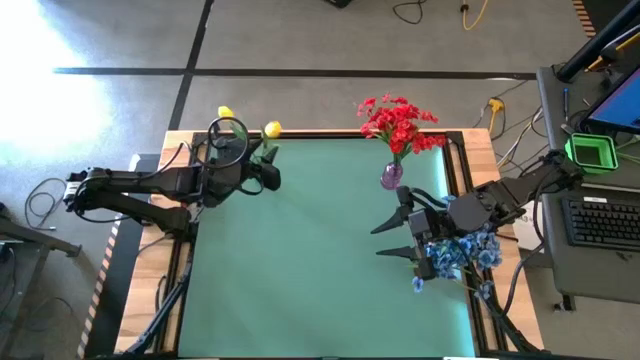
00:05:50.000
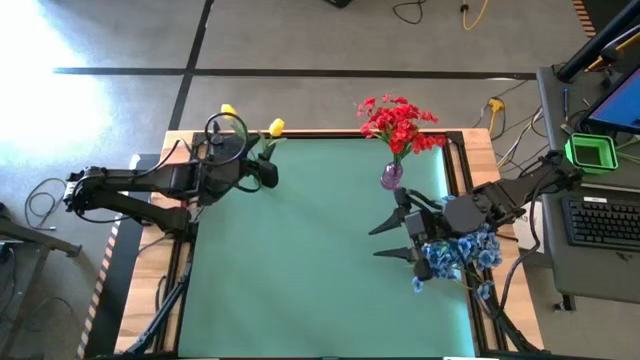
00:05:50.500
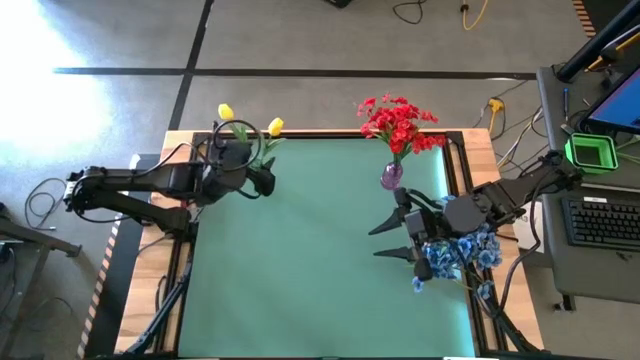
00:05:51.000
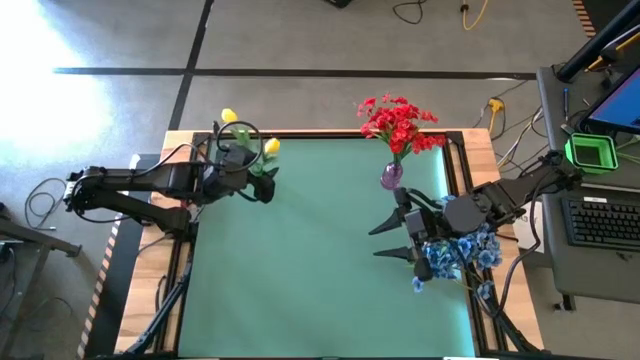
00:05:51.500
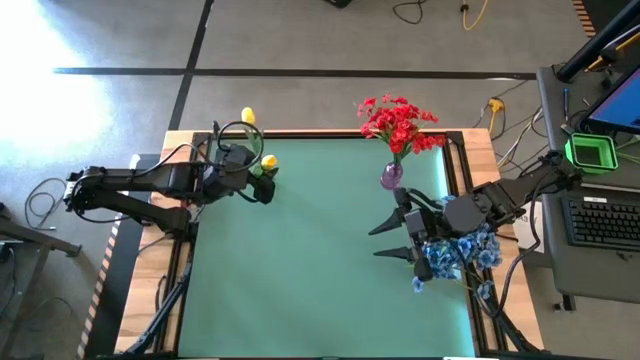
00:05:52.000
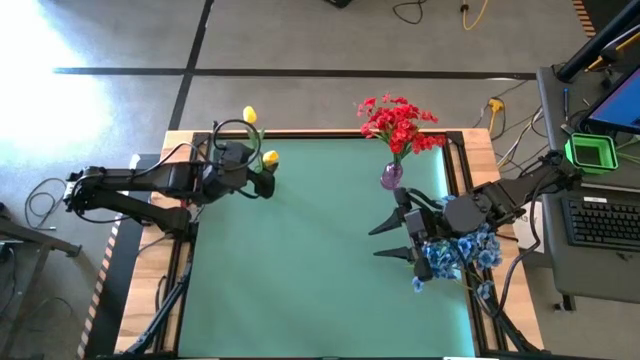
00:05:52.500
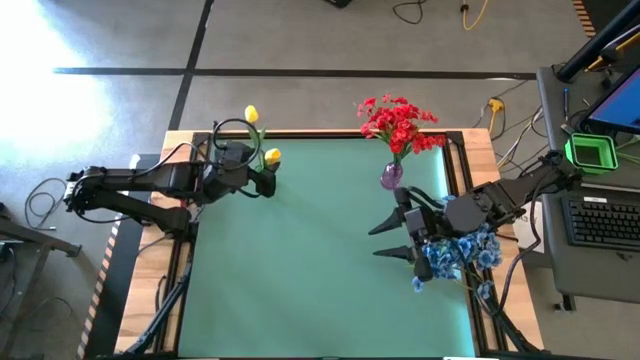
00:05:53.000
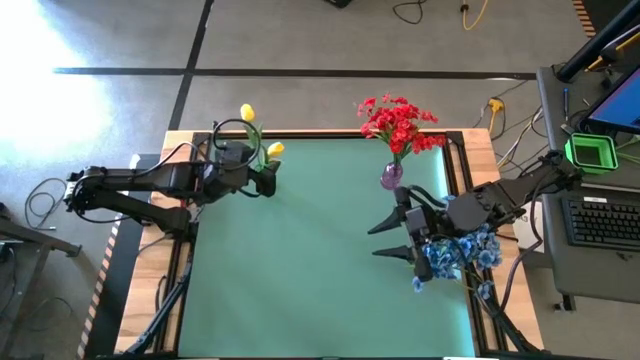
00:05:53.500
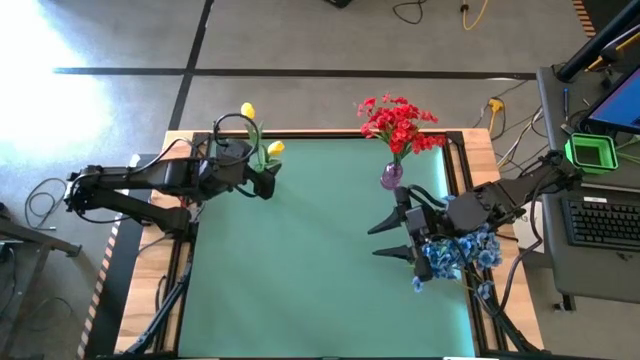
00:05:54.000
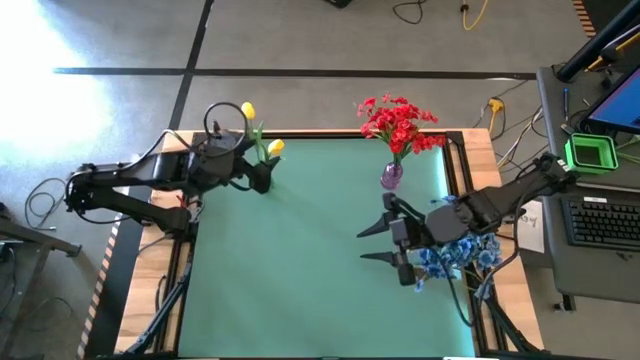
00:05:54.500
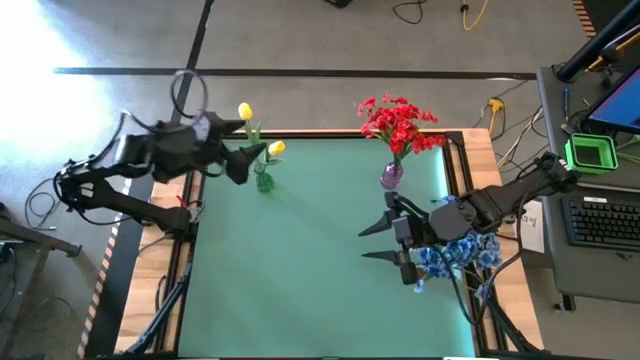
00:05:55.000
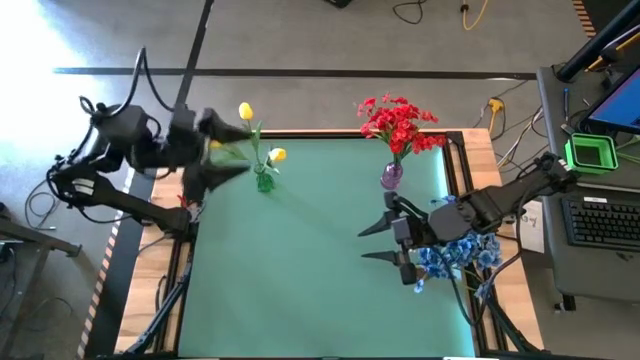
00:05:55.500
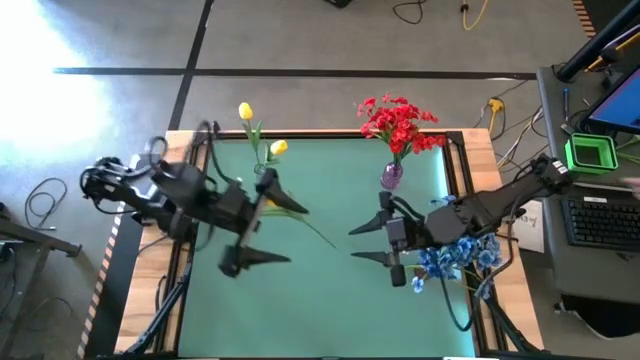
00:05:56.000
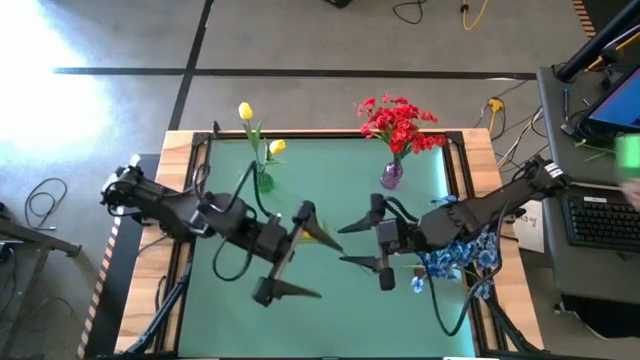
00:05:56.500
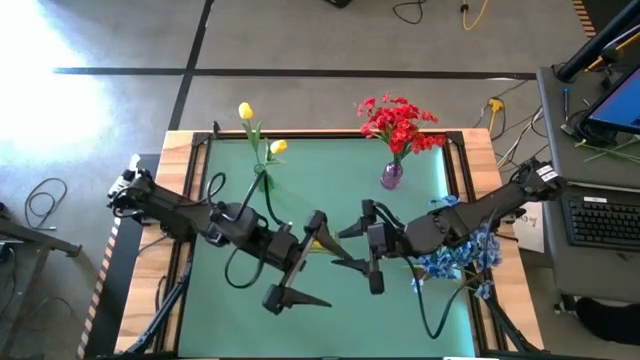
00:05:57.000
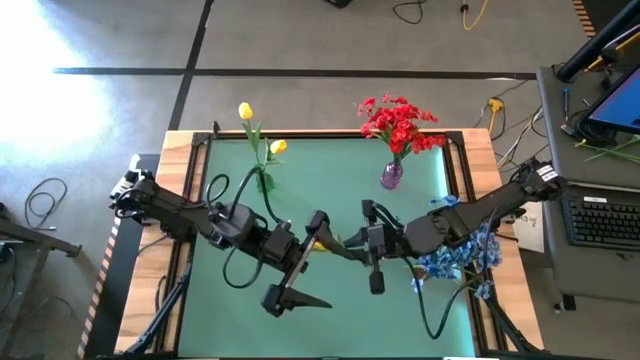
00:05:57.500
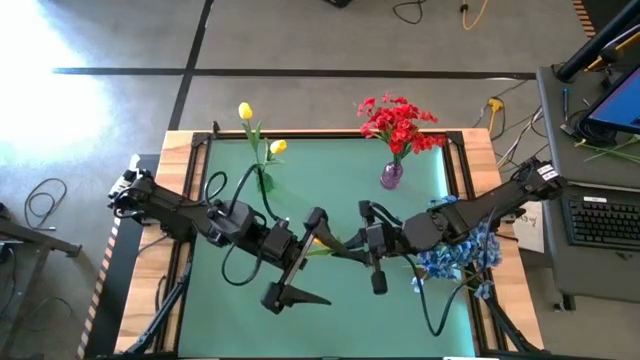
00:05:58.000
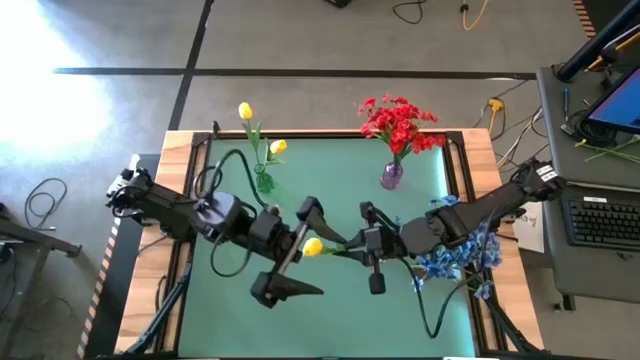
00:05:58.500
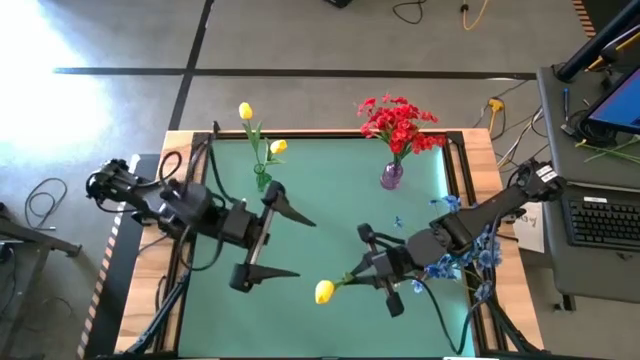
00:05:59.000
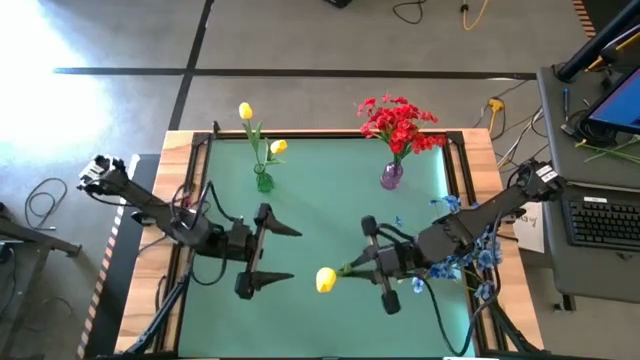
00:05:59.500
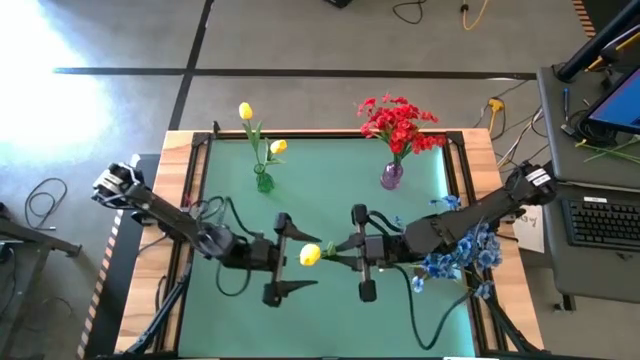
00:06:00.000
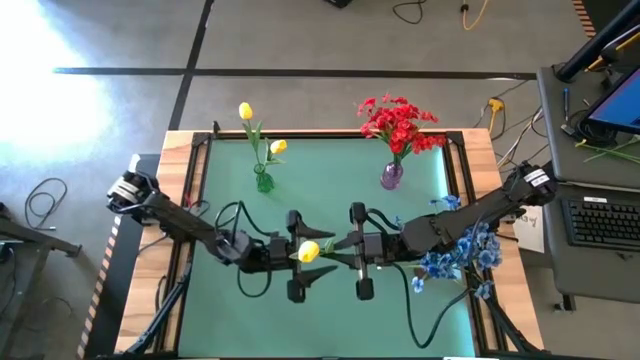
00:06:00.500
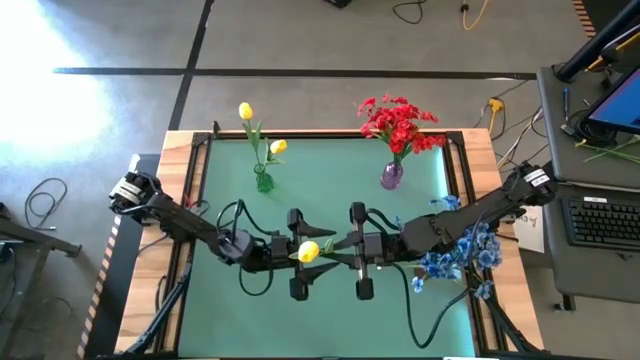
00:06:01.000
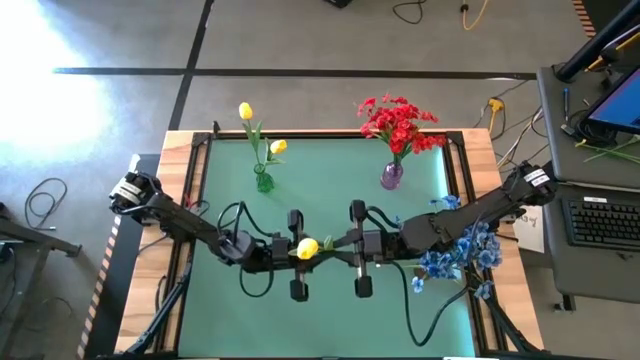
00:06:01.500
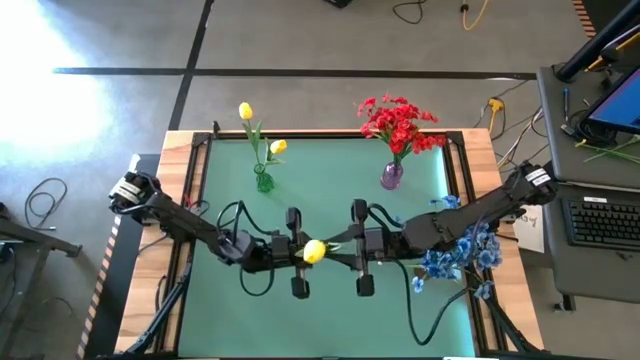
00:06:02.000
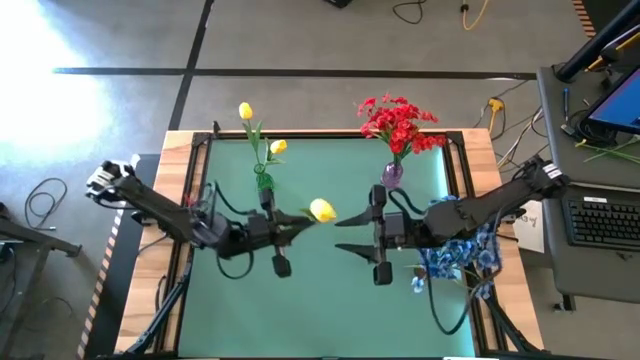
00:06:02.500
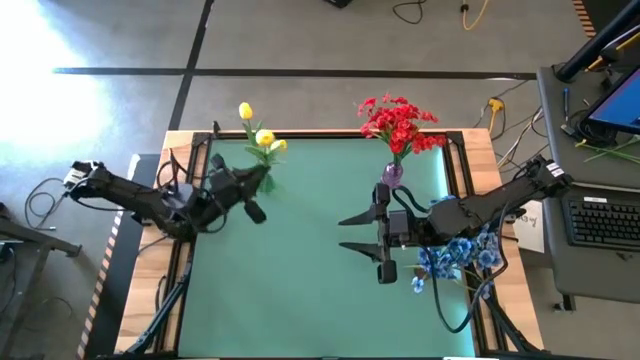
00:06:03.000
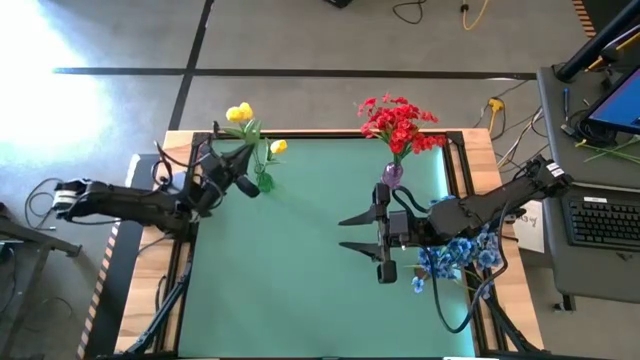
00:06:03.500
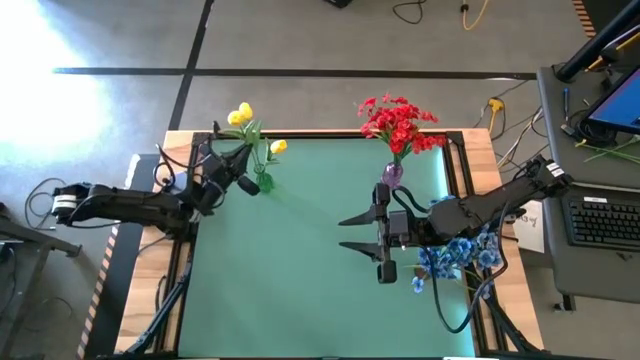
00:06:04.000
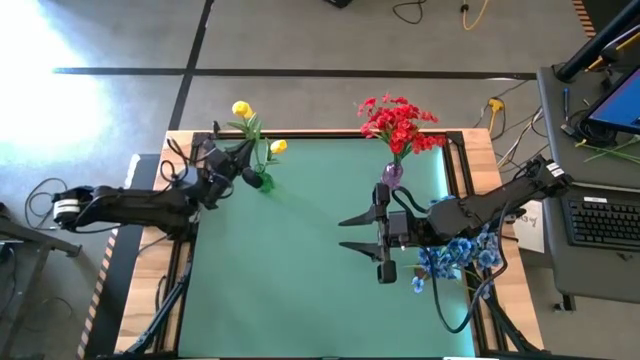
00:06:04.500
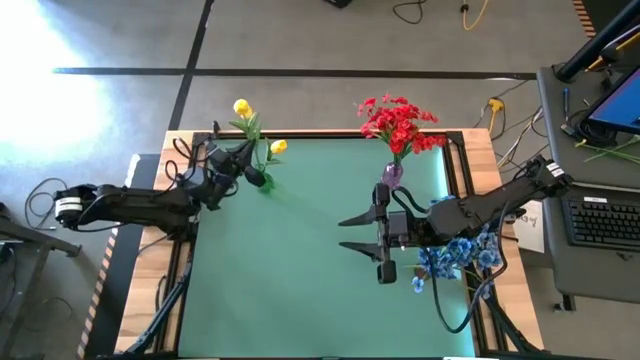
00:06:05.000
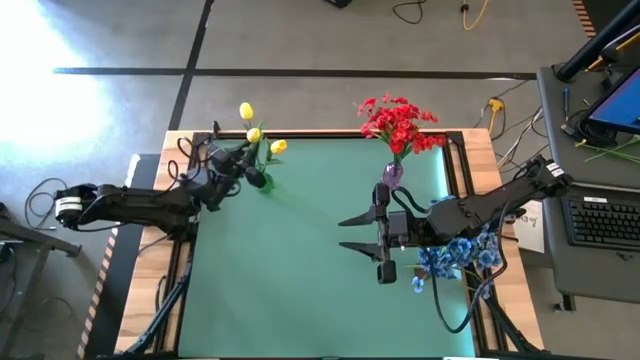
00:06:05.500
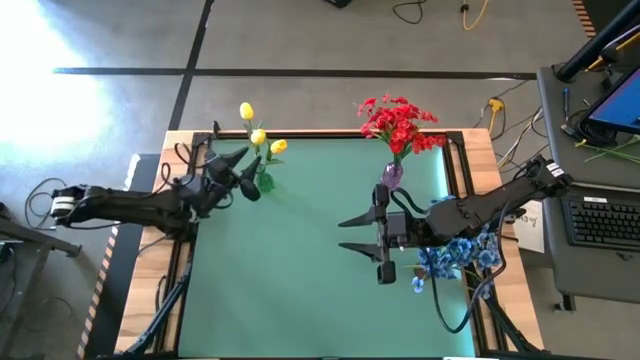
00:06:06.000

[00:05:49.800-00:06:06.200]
Task: Sort flowers into vase by color
Put the yellow tulip into the green vase

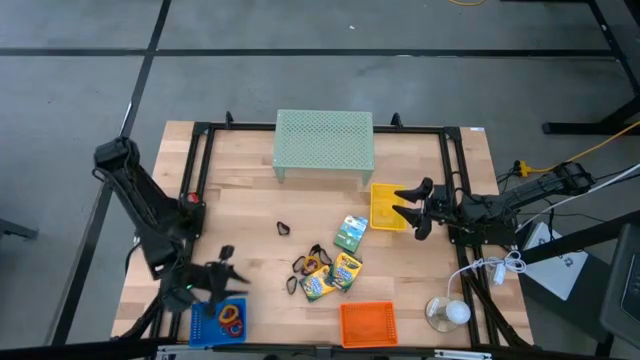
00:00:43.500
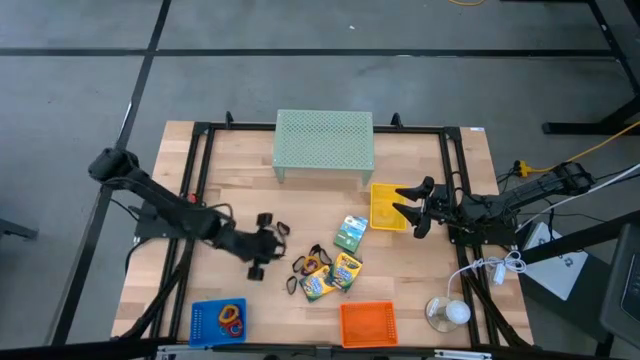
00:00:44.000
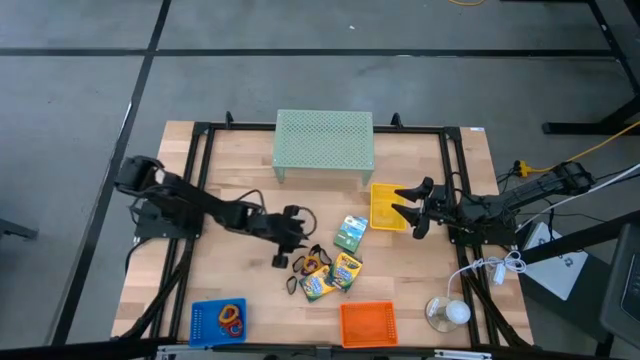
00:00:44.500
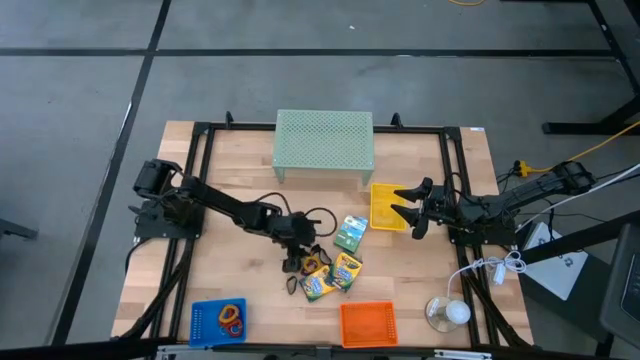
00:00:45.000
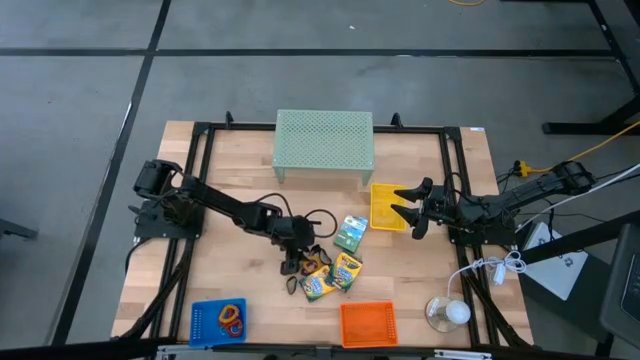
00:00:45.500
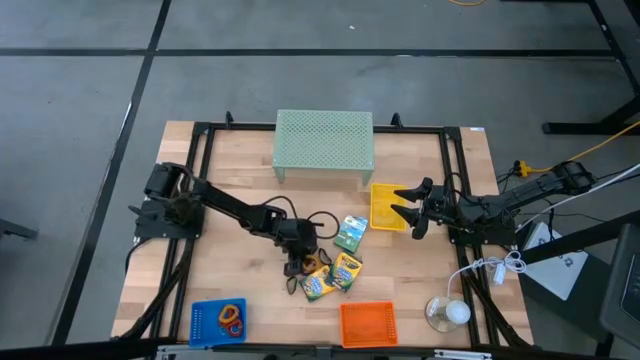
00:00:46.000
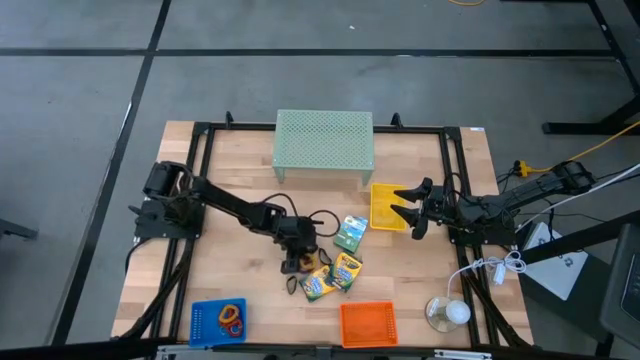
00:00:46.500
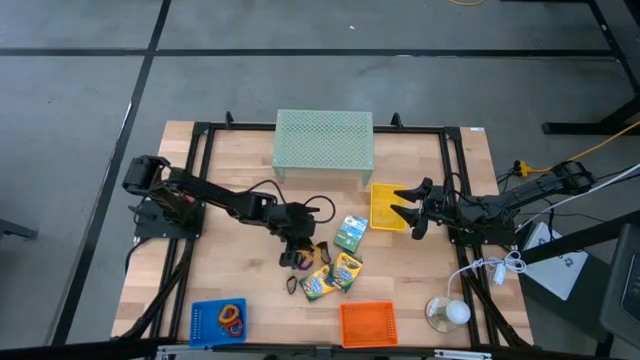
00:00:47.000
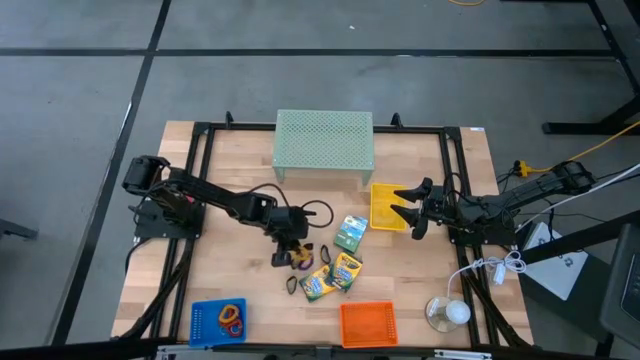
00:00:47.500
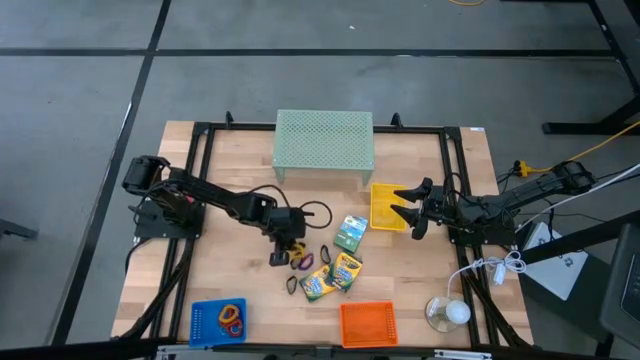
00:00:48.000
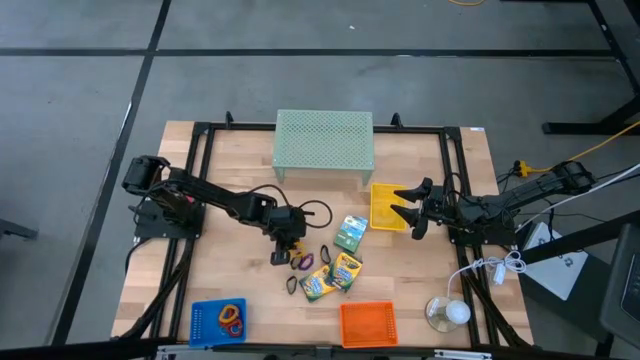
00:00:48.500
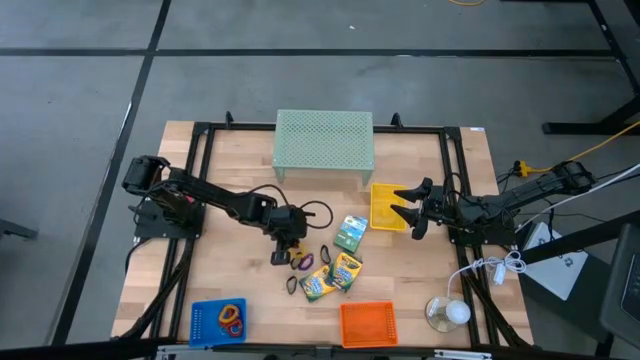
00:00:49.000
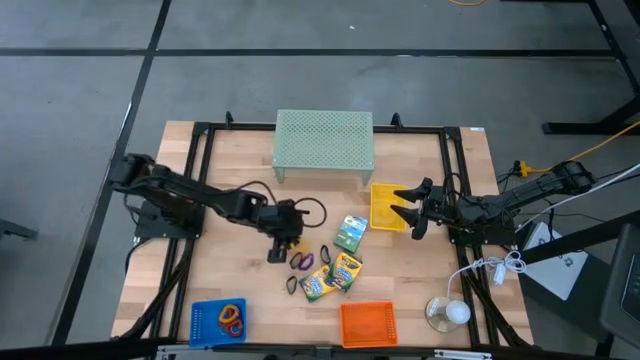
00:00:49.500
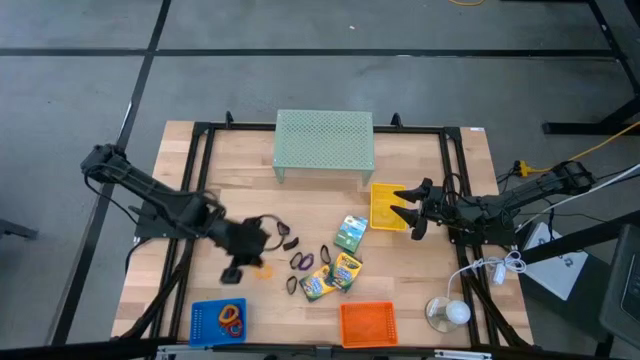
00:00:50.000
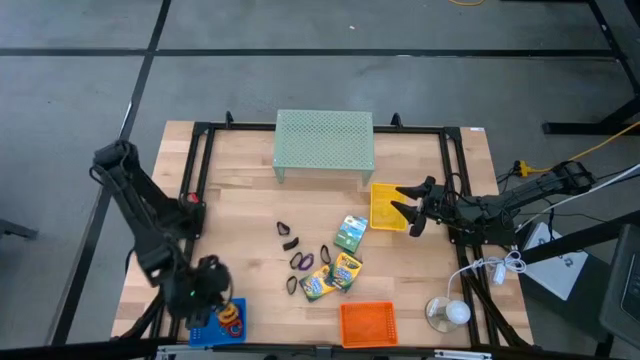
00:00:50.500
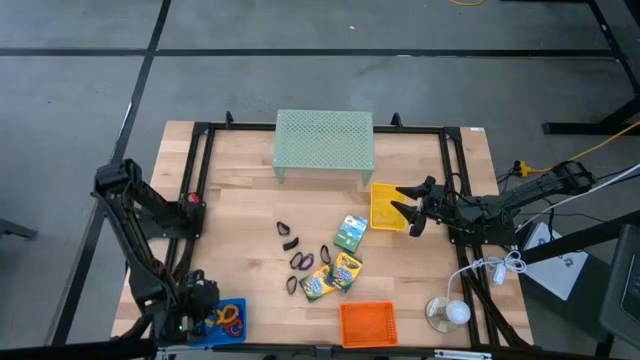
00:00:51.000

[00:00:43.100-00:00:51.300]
Task: Pick & Place Office Desk Supplies
Put the yellow spring keychain into the blue bin
